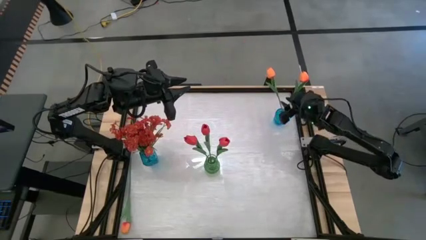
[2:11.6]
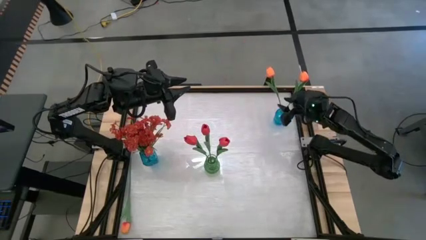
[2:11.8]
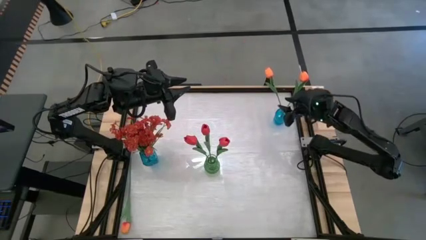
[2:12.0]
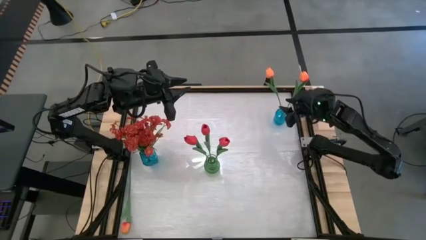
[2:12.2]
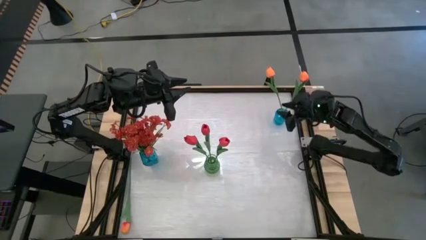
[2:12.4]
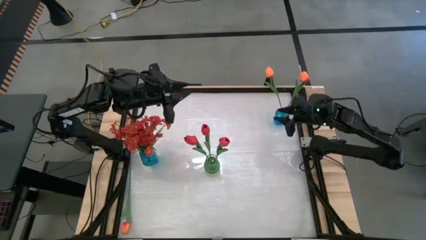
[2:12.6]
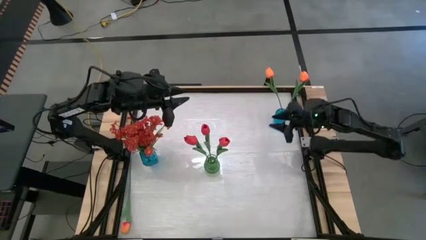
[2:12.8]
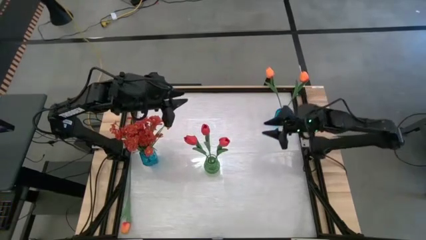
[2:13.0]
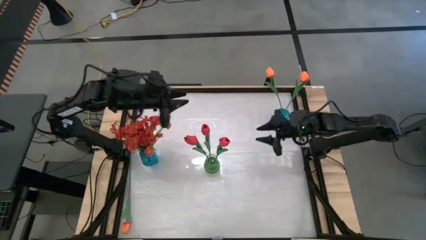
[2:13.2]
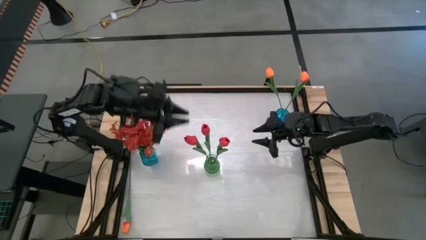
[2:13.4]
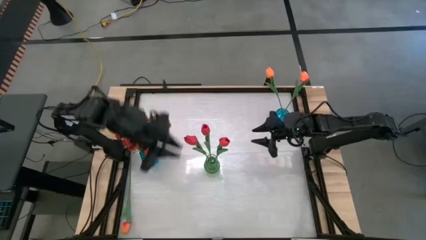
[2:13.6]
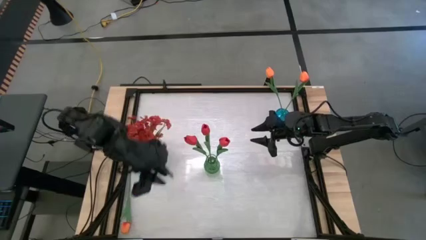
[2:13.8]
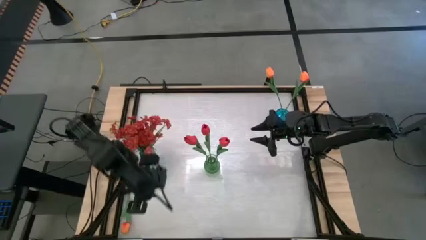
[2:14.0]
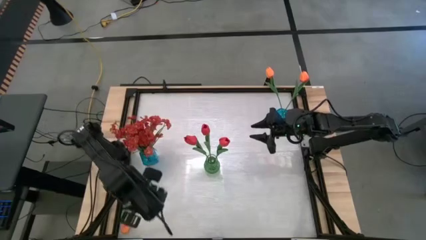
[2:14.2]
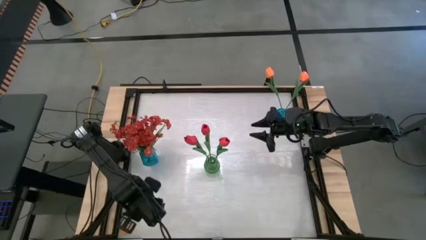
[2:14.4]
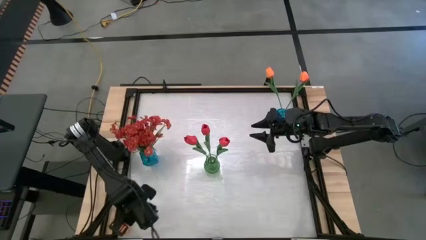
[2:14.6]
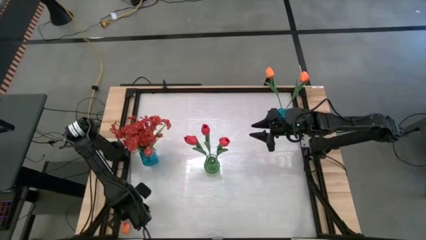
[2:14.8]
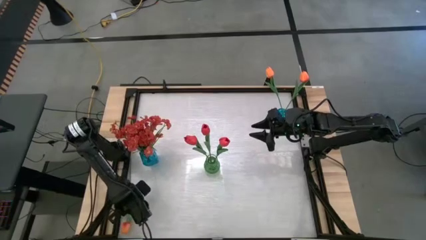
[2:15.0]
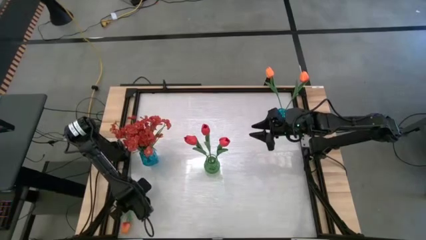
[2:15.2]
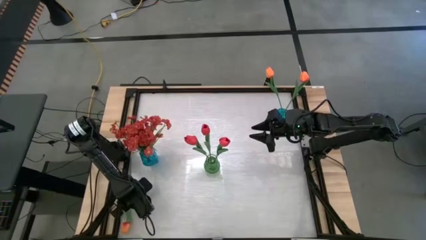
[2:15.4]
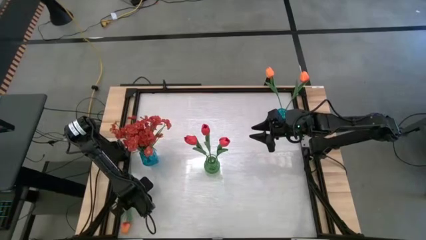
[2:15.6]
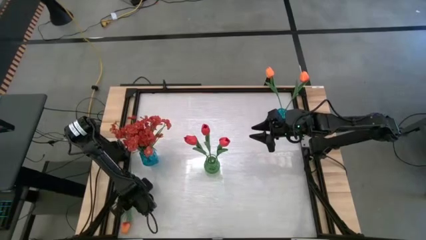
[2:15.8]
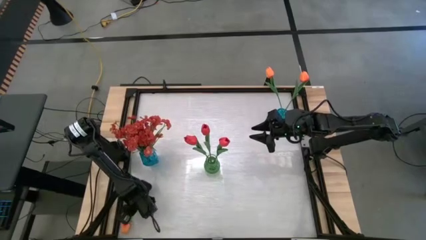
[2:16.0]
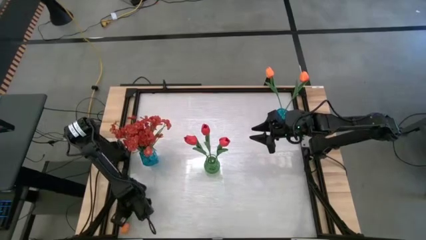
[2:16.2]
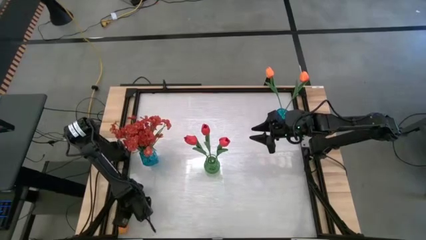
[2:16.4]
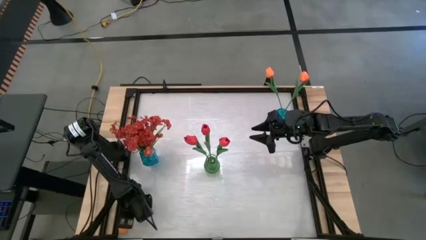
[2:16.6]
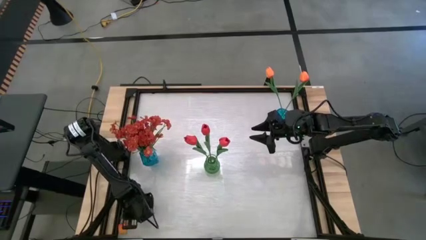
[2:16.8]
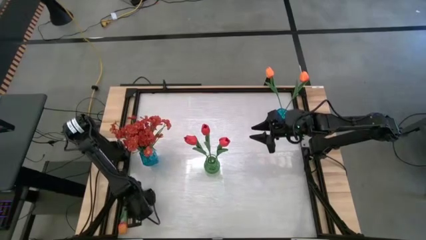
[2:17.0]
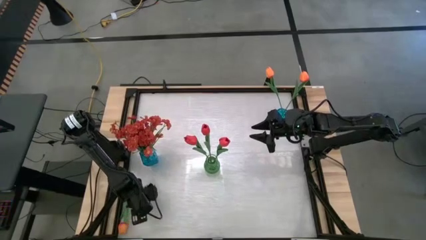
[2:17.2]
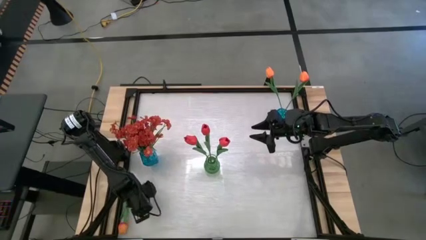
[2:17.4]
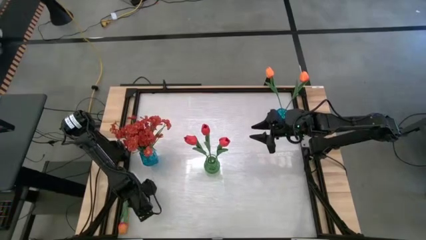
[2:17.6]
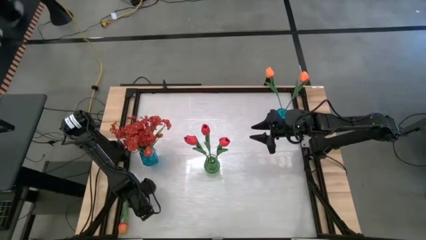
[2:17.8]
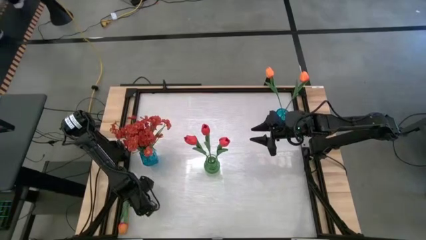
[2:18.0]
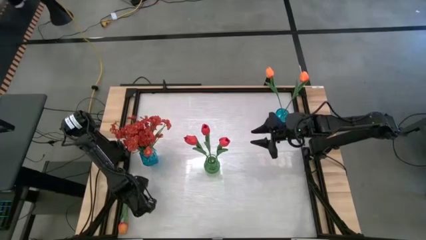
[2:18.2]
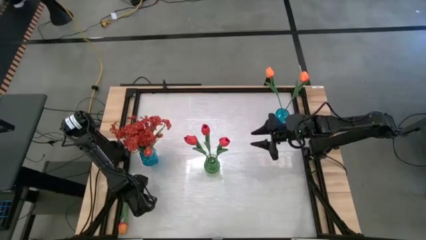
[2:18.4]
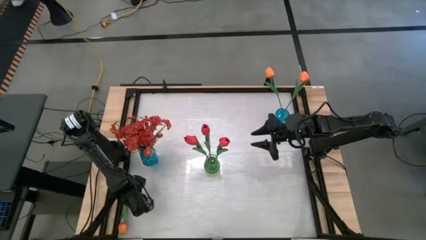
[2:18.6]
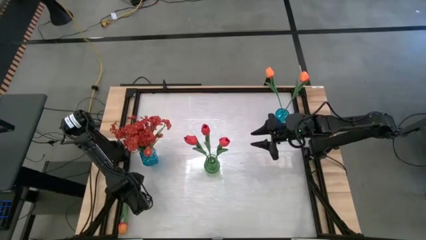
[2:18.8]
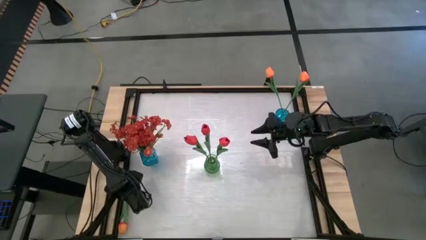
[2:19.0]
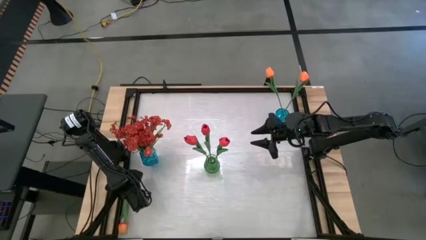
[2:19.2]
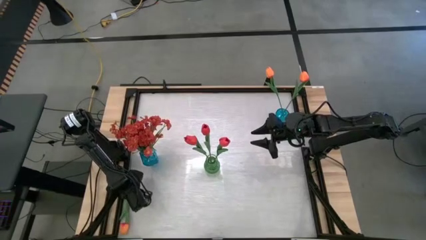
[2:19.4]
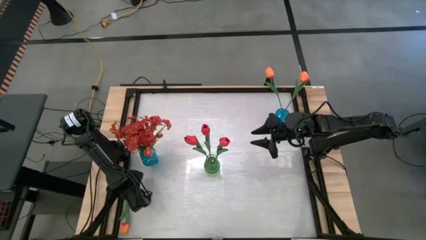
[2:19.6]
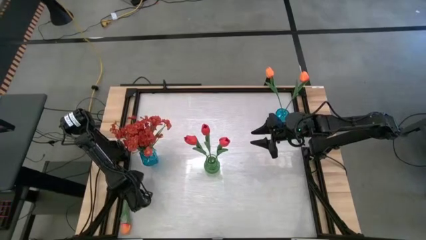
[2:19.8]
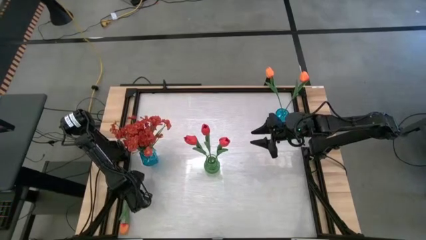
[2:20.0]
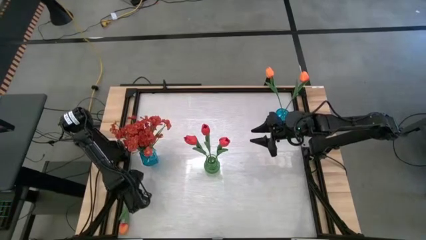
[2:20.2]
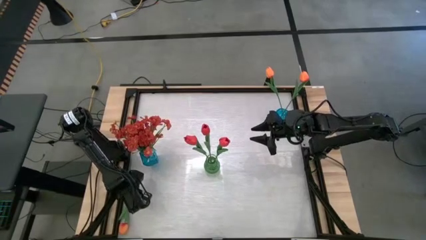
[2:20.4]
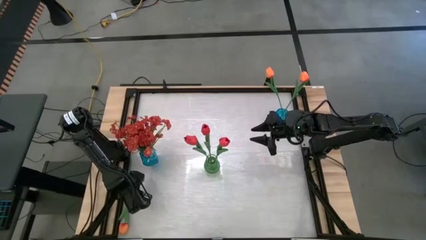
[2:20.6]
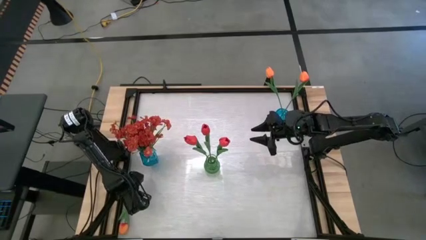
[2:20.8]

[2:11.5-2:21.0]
Task: Sort flowers into vase by color
Put the orange flower into the right blue vase

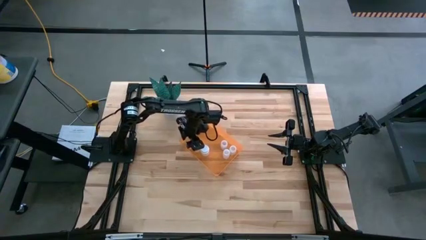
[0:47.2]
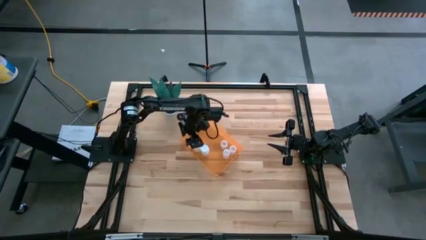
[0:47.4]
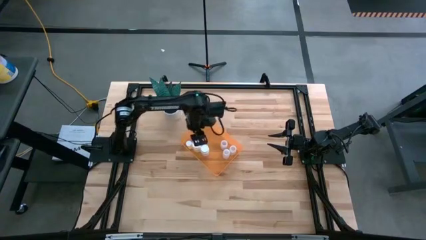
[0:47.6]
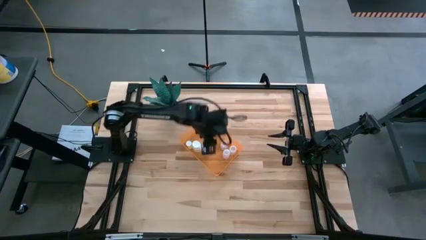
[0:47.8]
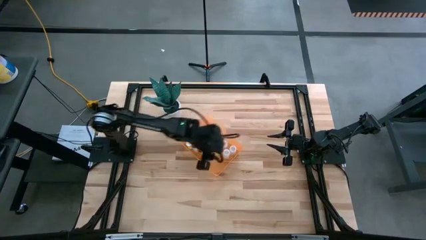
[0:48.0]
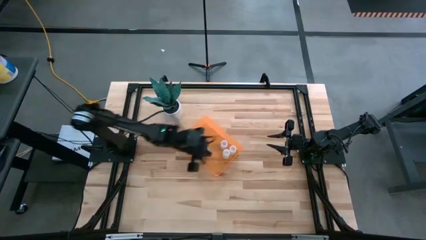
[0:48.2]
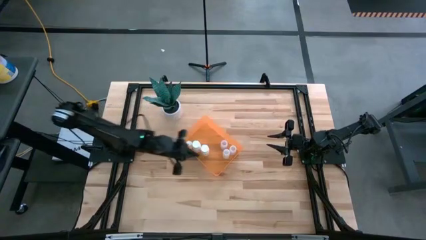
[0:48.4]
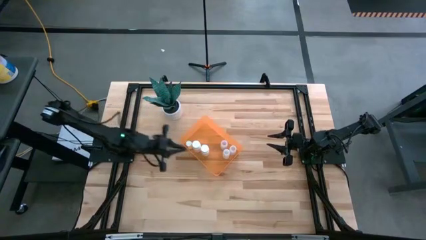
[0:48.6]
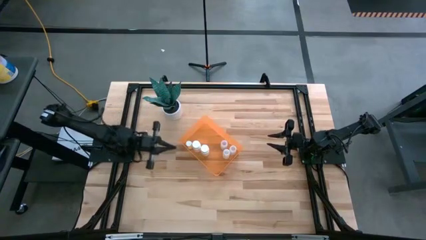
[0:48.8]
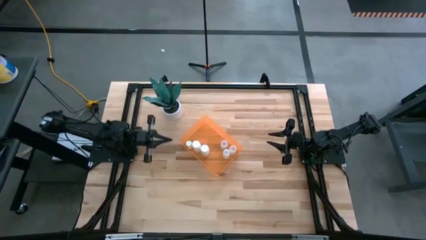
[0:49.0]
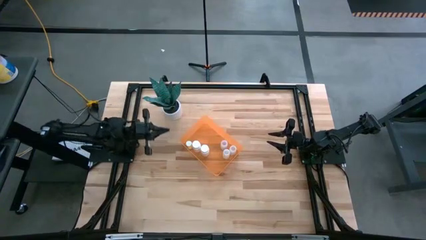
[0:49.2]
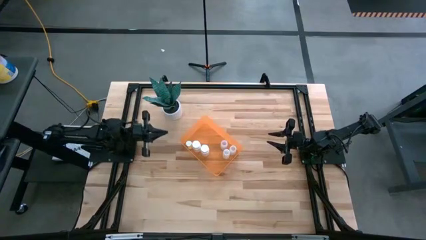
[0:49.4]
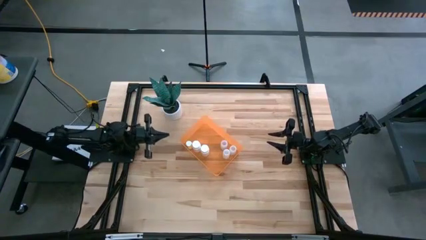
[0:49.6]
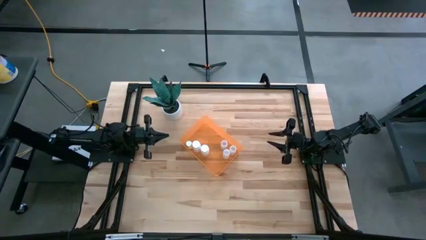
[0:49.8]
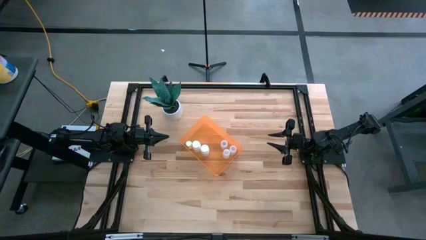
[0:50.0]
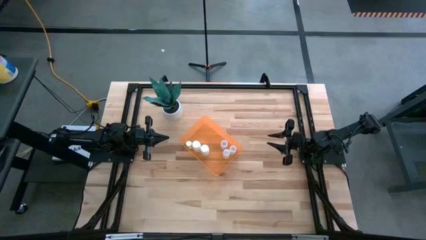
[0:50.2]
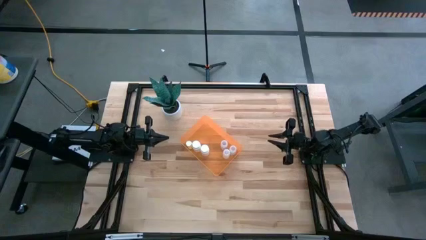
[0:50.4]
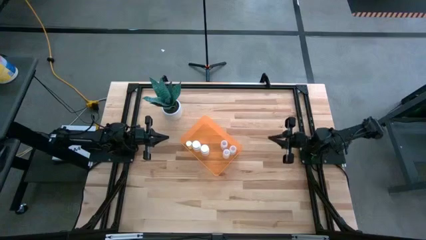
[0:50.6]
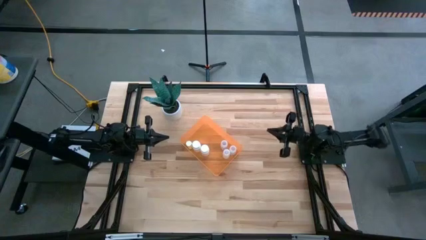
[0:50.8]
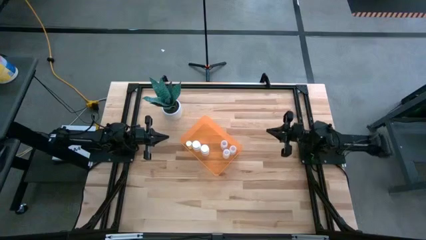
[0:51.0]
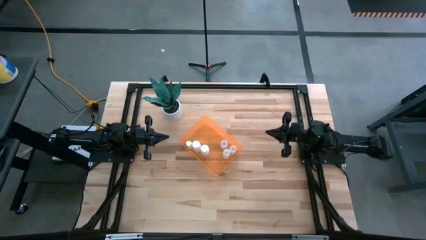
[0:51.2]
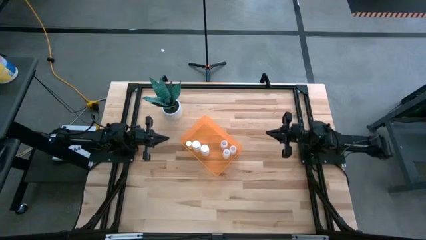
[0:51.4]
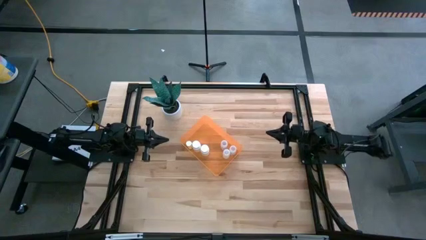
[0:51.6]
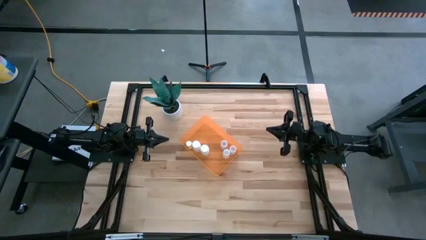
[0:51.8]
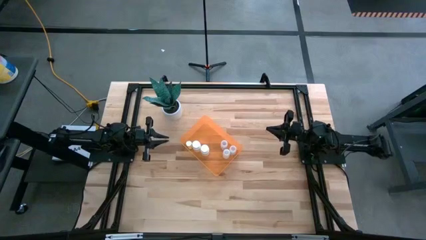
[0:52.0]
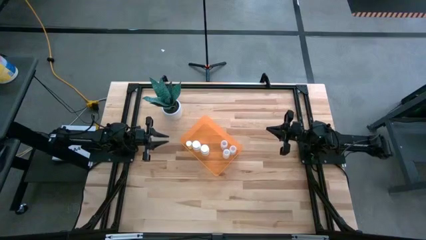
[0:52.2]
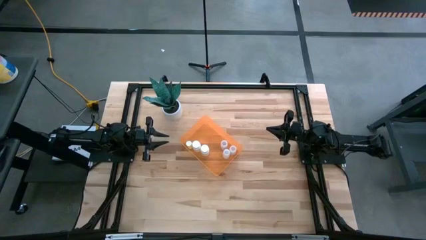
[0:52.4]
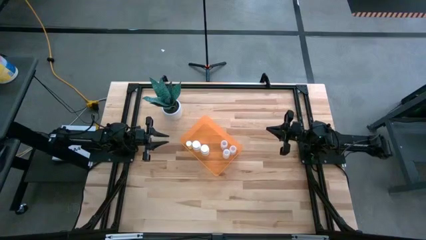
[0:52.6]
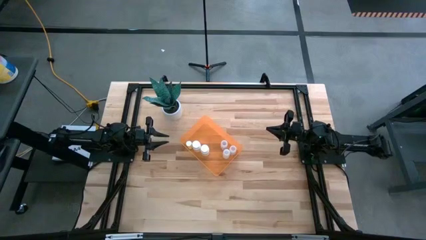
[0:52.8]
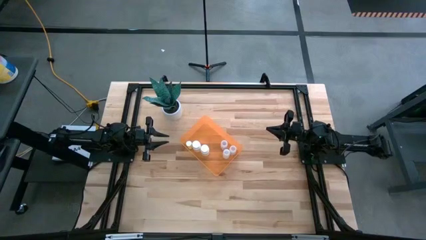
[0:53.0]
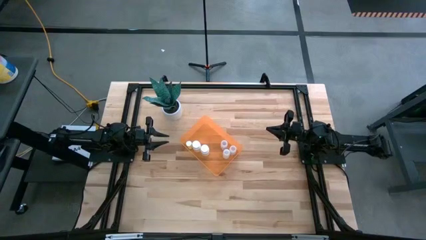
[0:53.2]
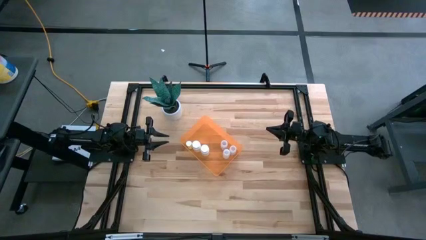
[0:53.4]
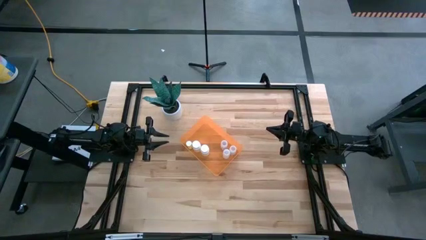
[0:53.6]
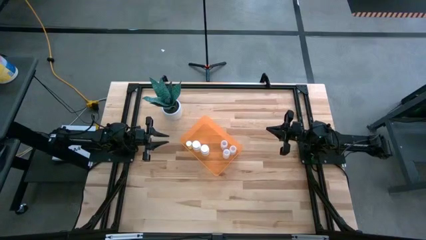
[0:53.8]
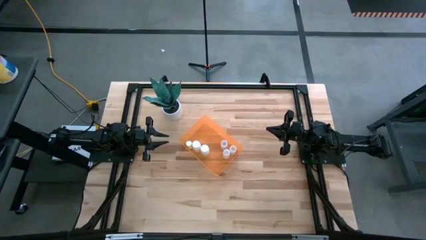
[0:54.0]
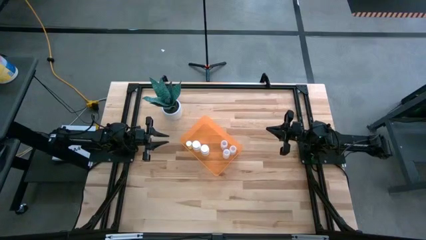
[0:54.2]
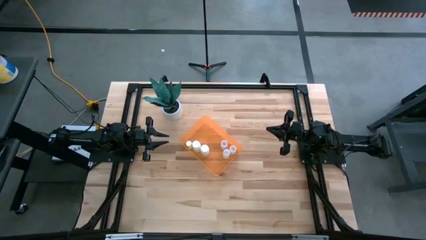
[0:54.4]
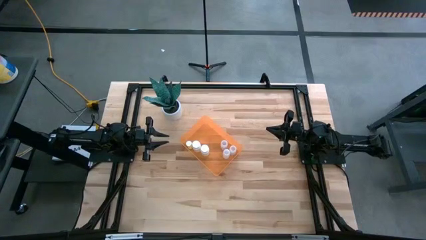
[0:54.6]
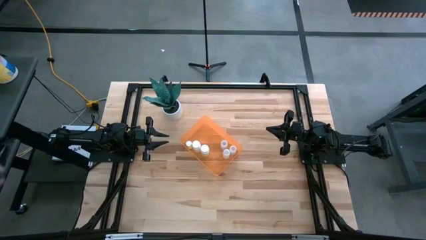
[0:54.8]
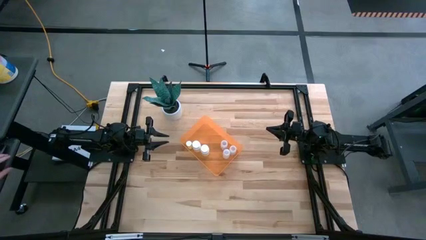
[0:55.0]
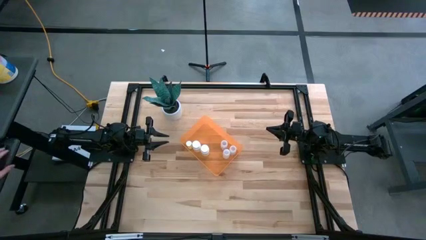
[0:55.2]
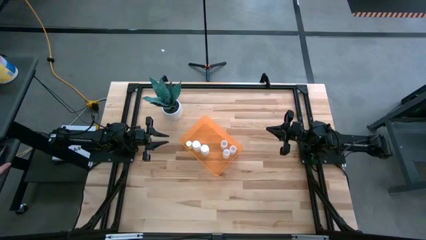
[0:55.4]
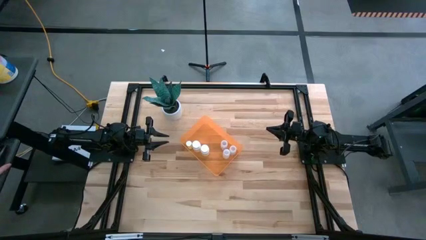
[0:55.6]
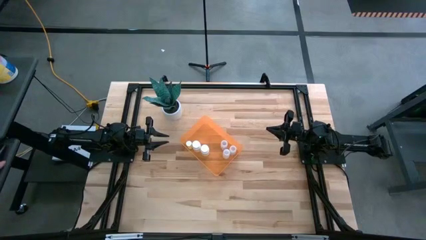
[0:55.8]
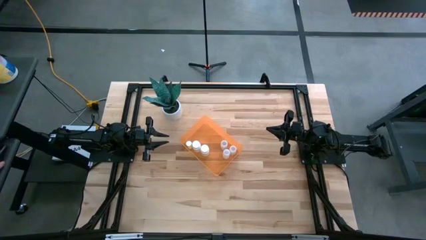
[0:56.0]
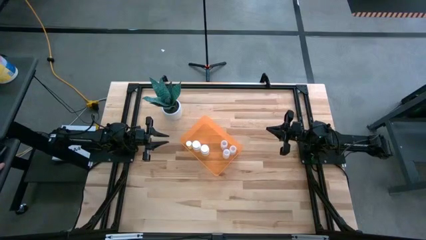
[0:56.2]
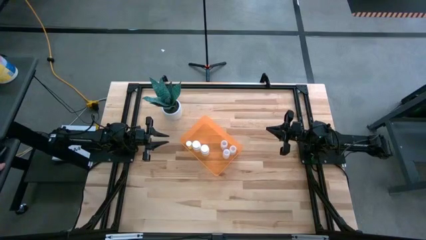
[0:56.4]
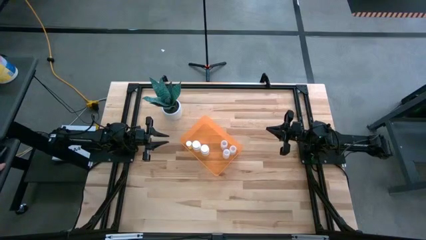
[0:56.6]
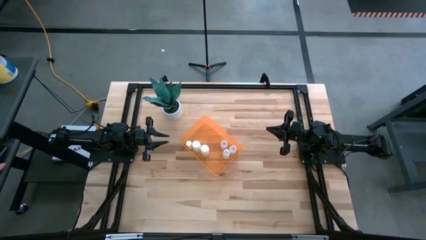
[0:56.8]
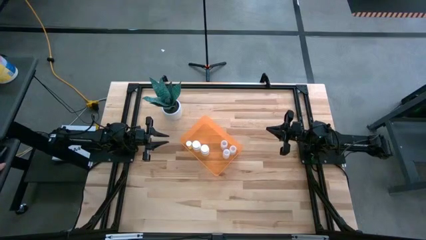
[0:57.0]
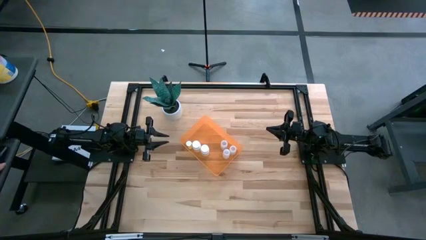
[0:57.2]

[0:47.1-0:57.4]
Task: Pick and place pill bottles into a basket
Return to Home Position
